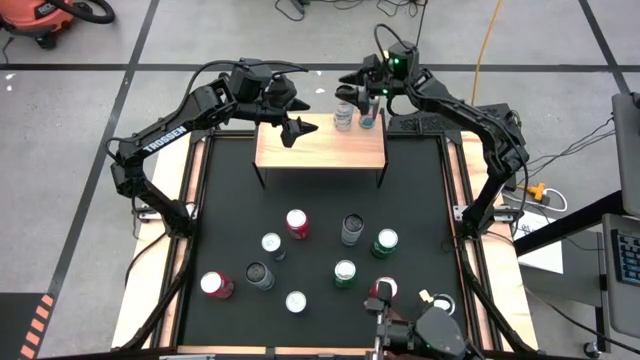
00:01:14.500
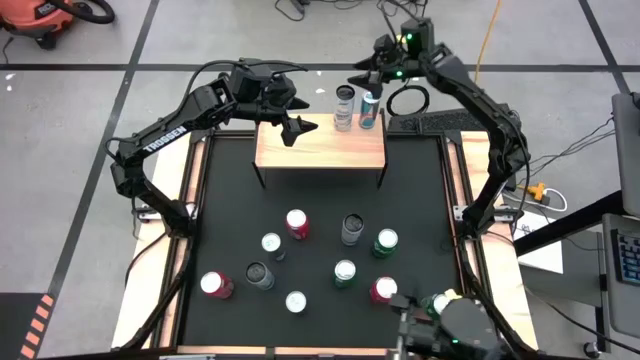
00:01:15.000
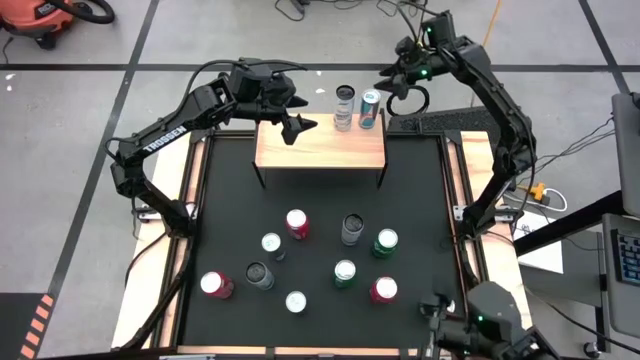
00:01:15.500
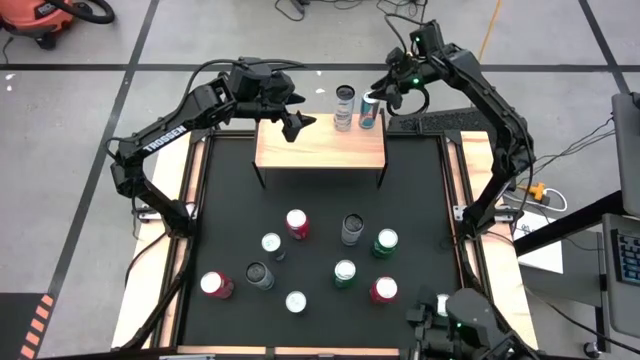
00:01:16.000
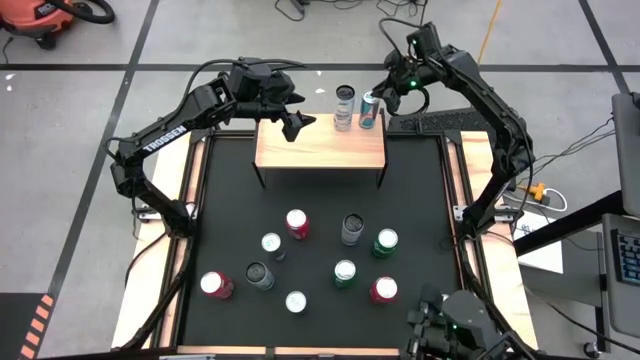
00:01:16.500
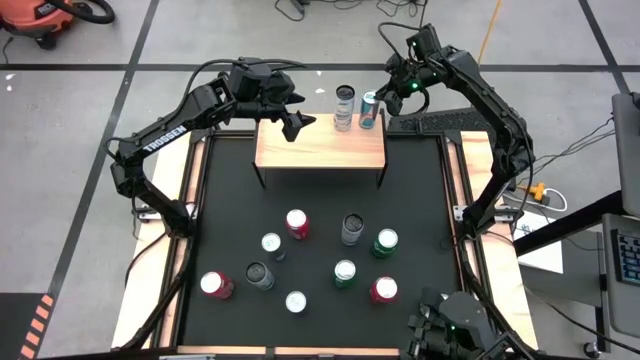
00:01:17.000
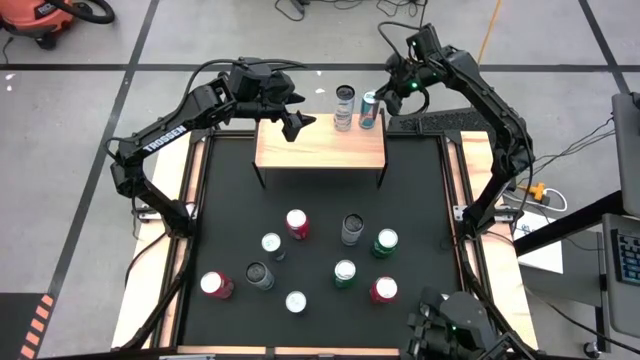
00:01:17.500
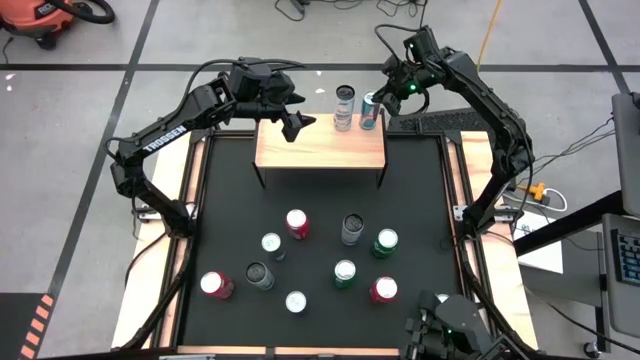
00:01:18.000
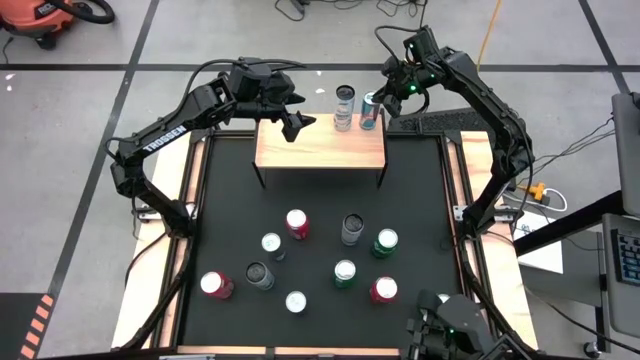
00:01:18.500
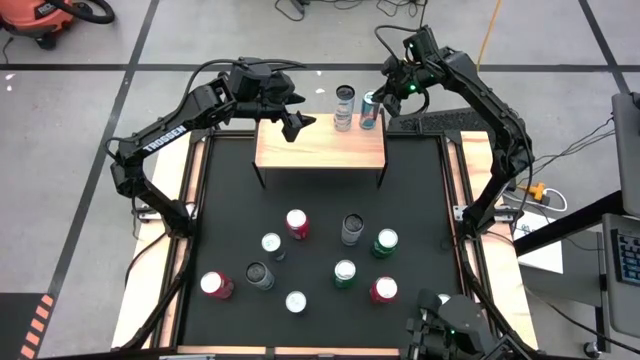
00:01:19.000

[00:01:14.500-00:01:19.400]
Task: Place canned beverage on shelf
Adjust the blue soda can on the shelf

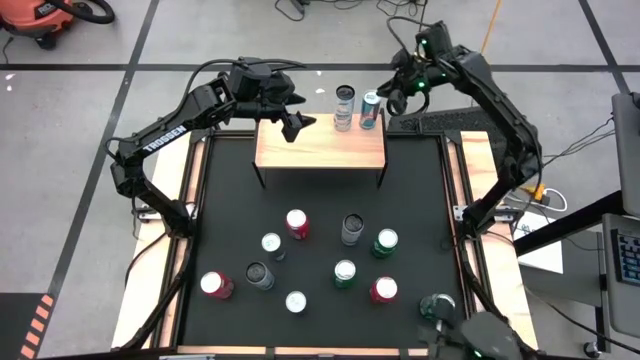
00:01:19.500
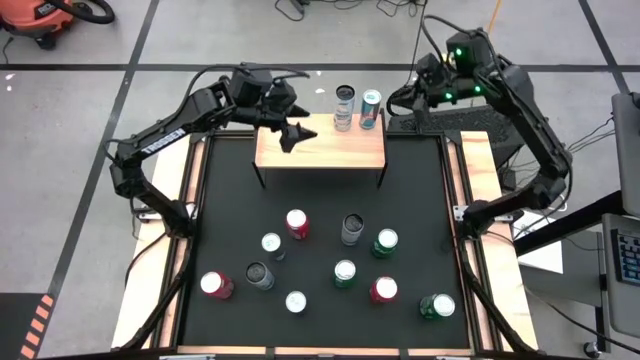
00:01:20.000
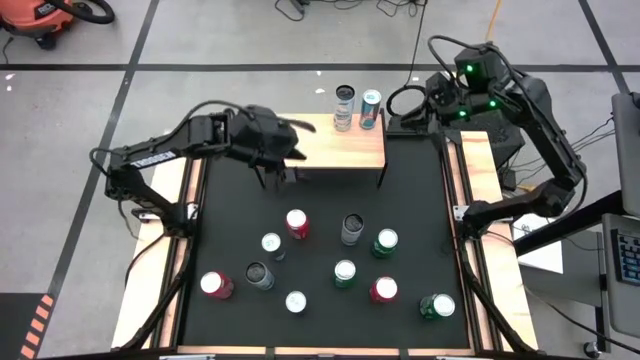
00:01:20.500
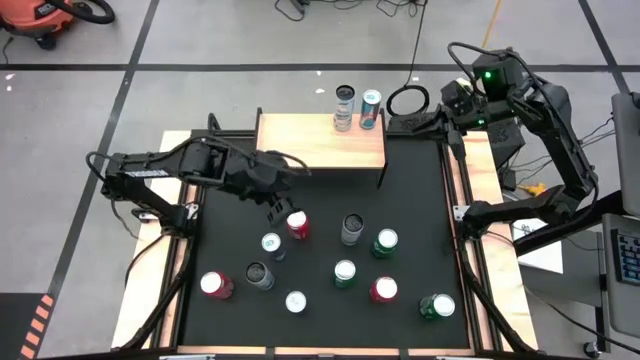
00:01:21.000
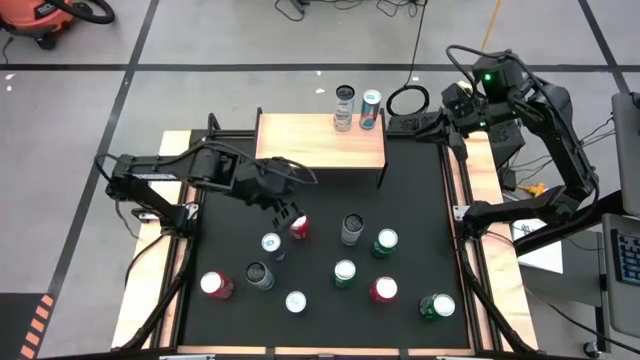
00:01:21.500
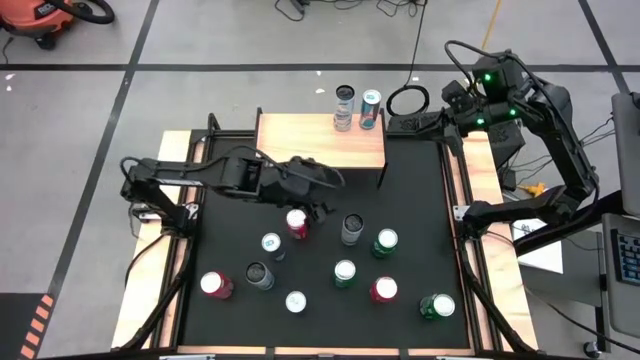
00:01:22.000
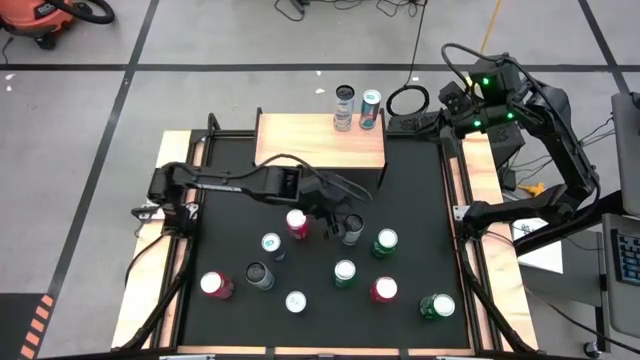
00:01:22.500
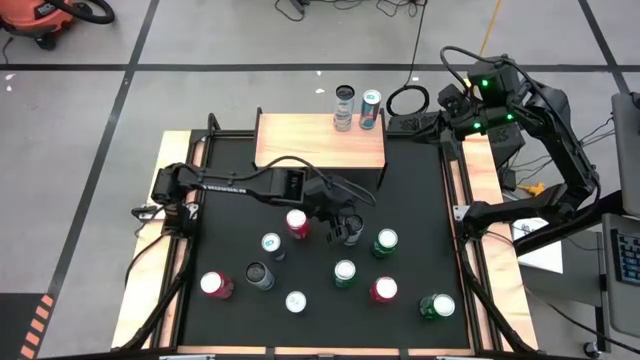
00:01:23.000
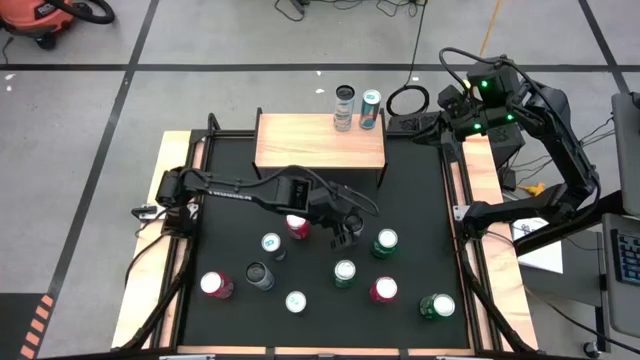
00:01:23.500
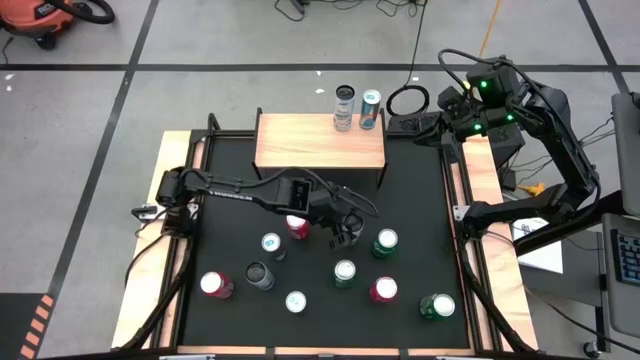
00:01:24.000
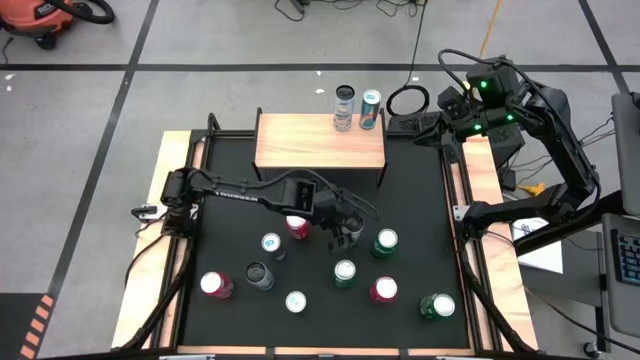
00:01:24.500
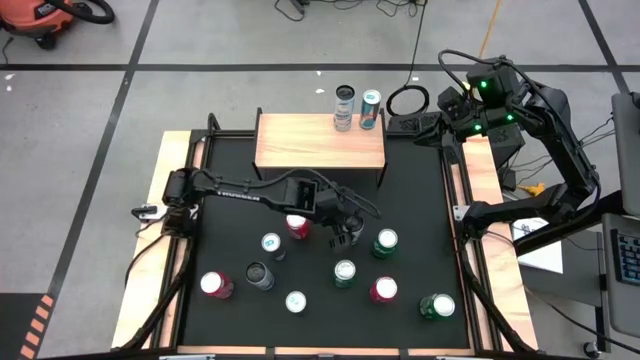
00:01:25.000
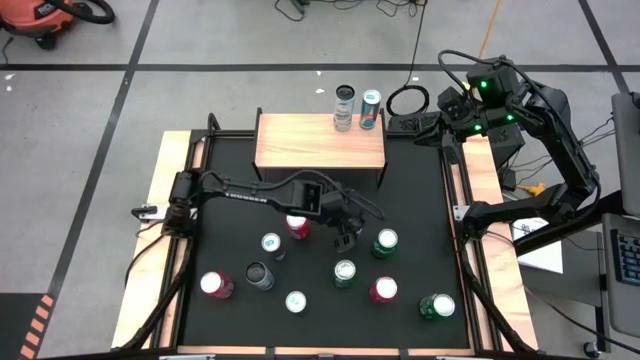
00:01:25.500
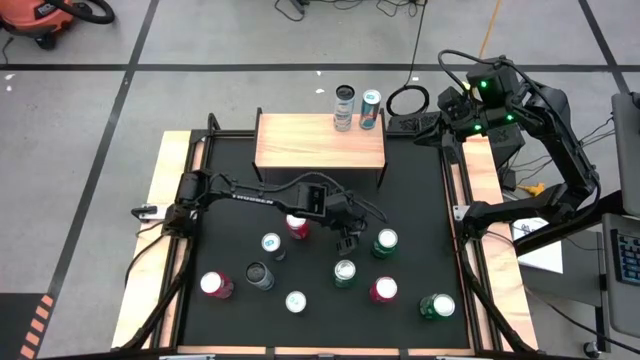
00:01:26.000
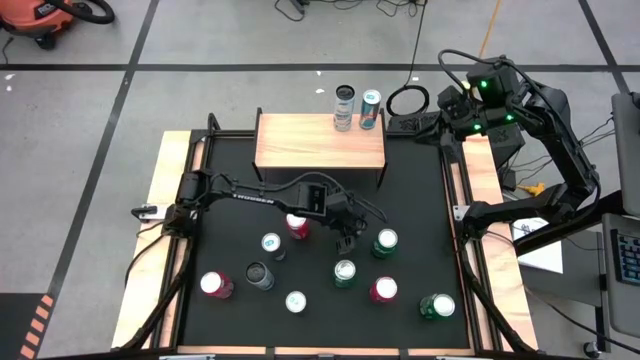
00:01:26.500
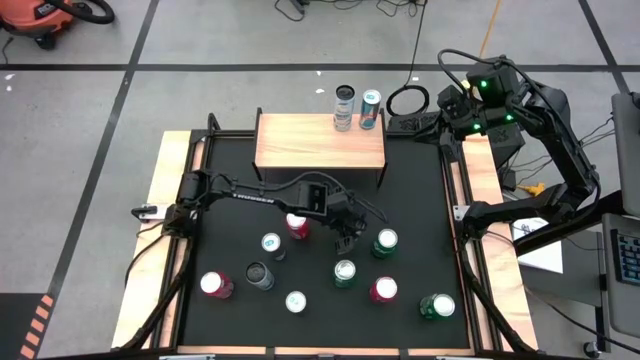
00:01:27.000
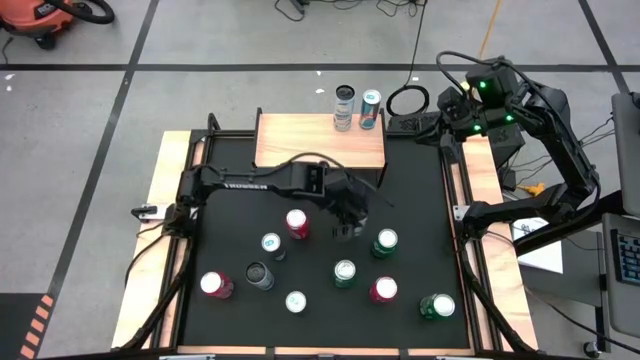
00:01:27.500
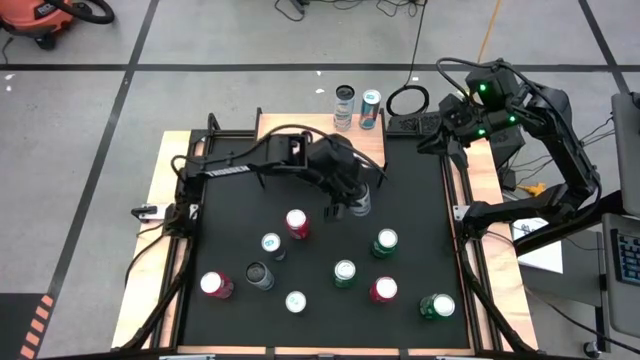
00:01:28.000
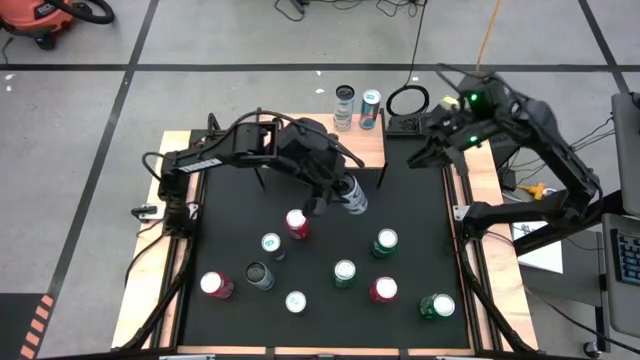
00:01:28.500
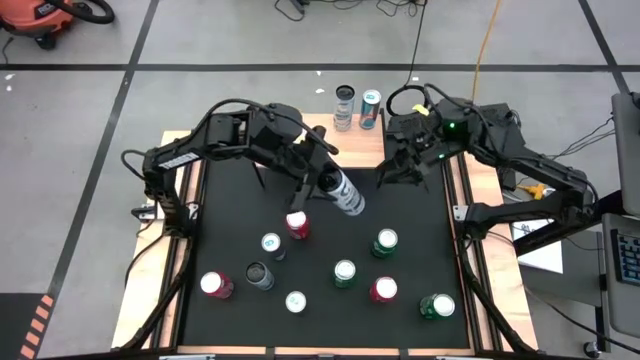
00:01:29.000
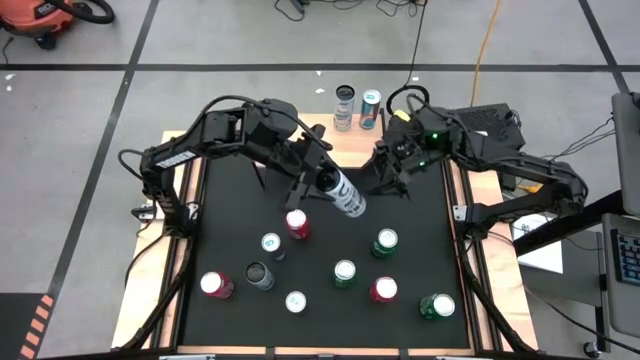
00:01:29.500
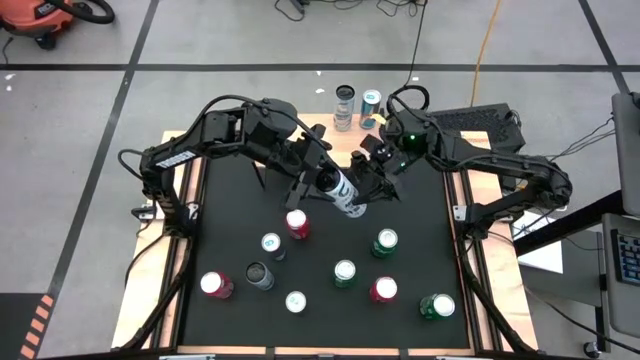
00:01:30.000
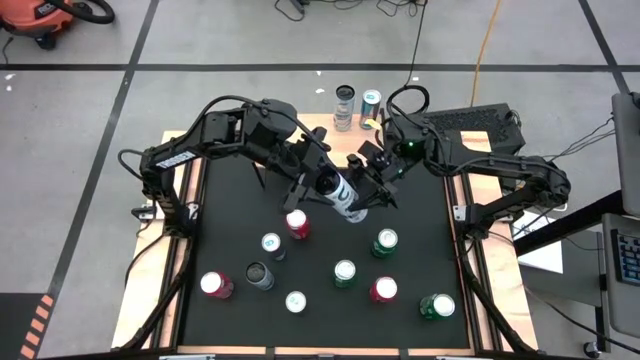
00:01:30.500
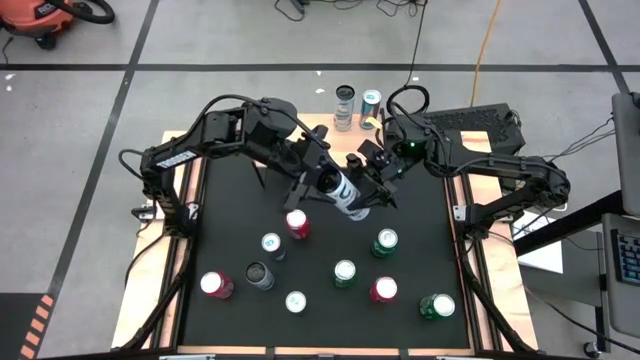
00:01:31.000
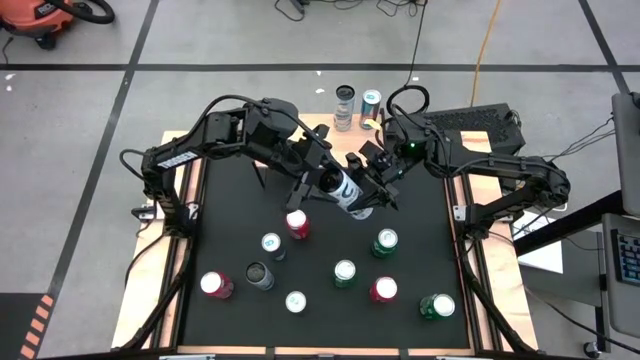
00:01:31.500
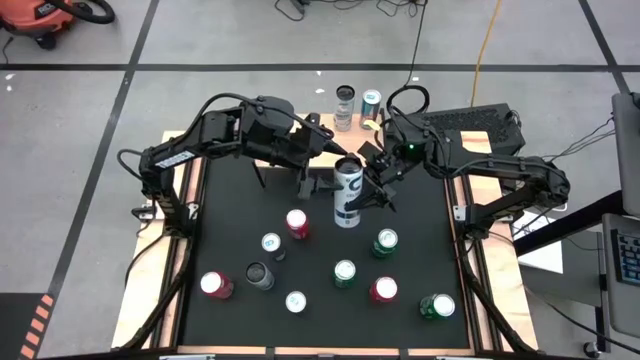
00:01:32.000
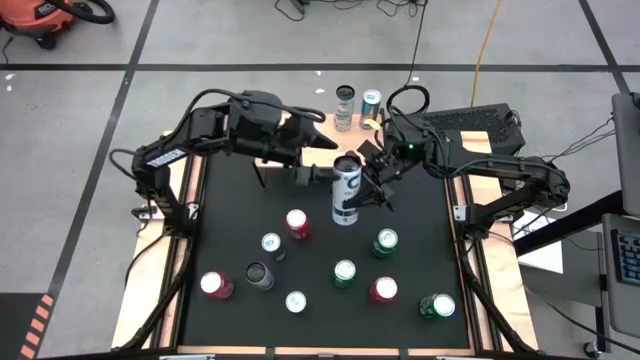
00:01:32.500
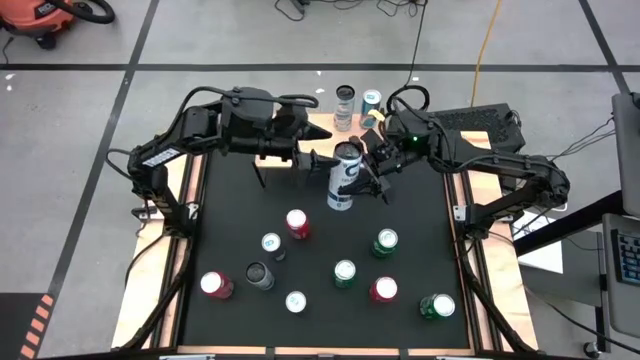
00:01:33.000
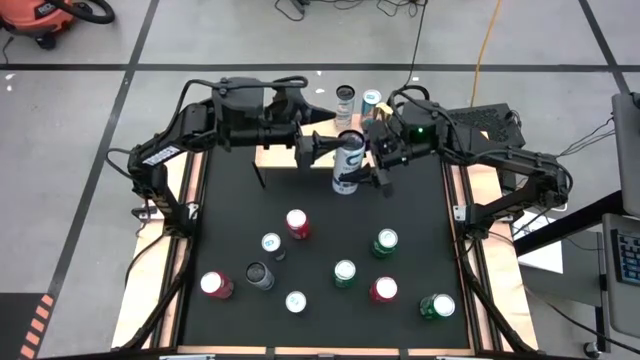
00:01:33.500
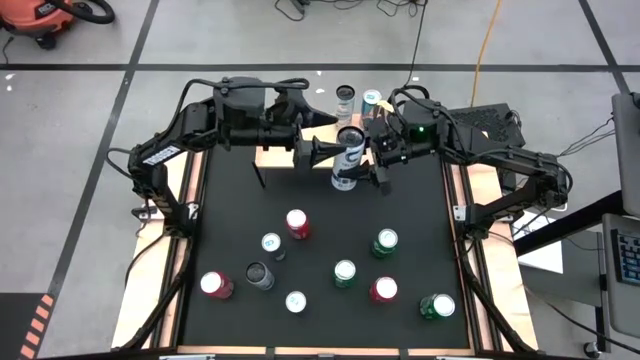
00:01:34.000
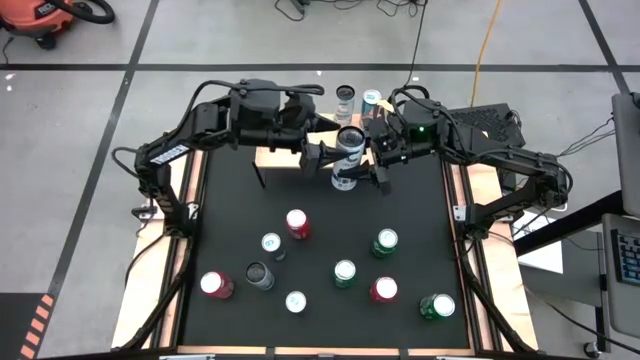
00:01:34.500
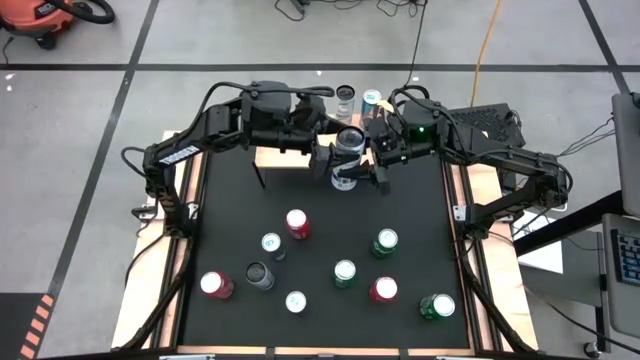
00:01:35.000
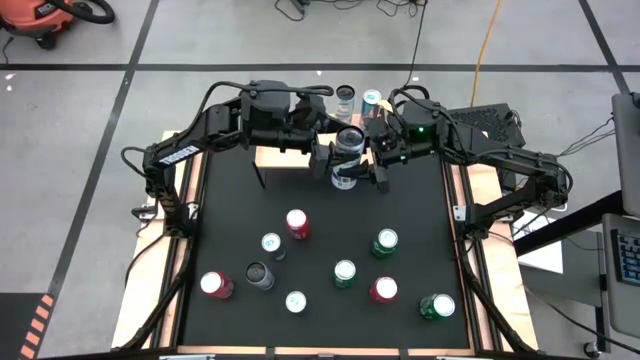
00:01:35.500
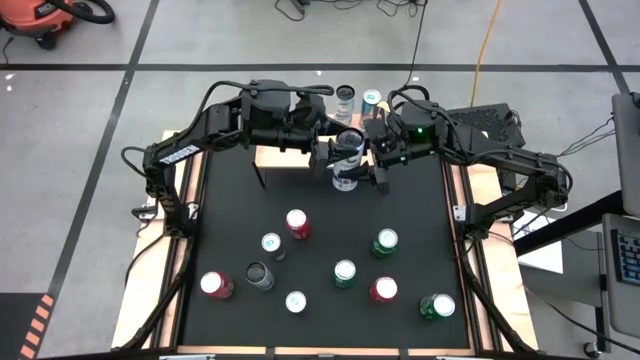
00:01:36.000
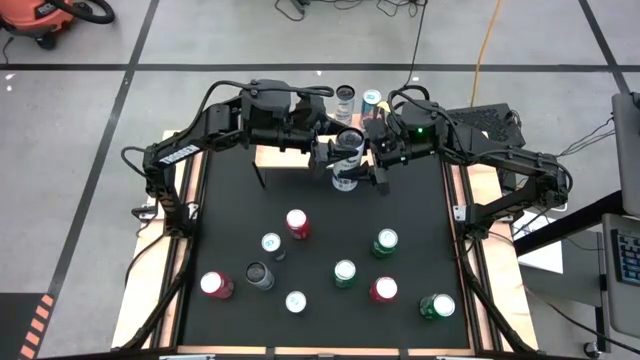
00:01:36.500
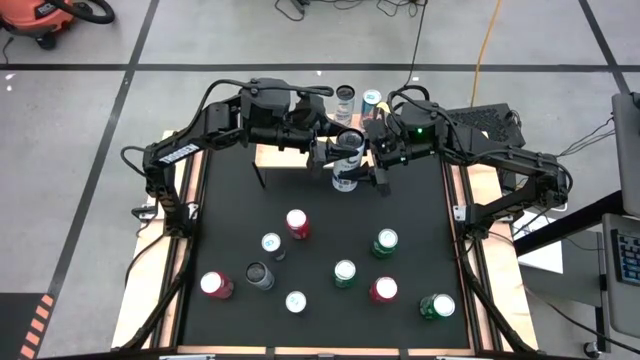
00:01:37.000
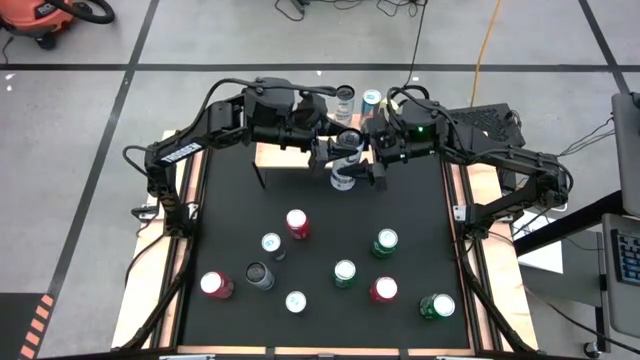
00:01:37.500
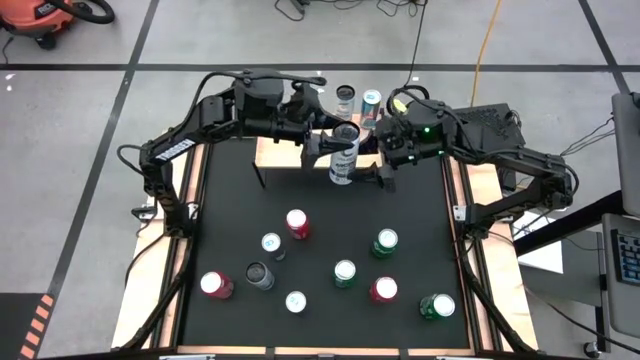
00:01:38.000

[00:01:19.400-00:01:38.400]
Put the right white soda can on the shelf aligned with the other white soda can
